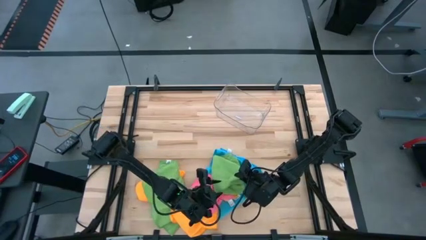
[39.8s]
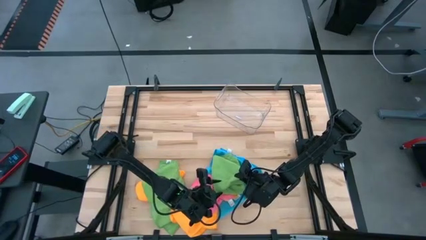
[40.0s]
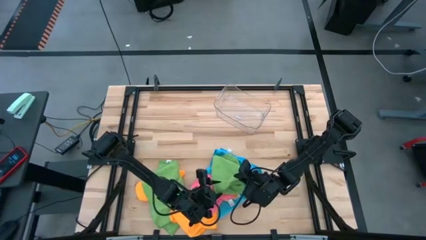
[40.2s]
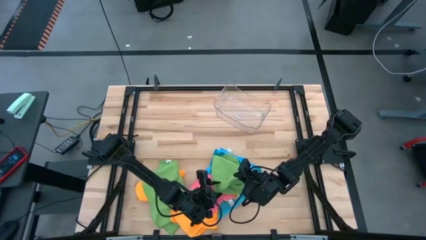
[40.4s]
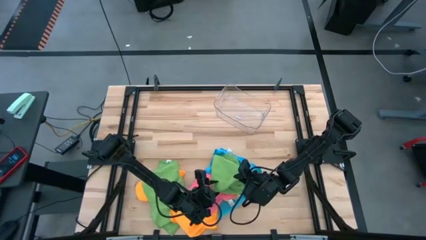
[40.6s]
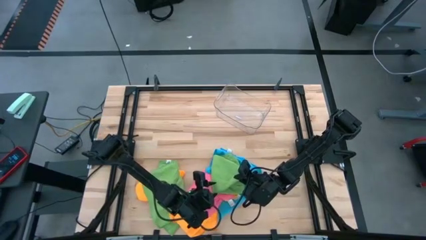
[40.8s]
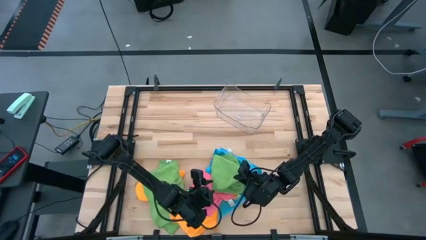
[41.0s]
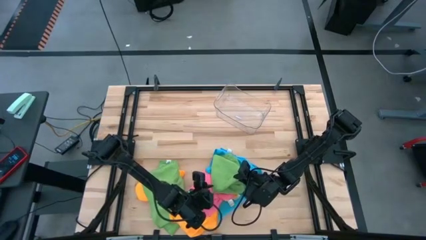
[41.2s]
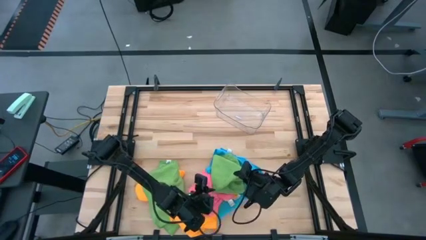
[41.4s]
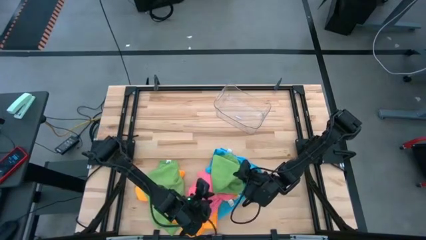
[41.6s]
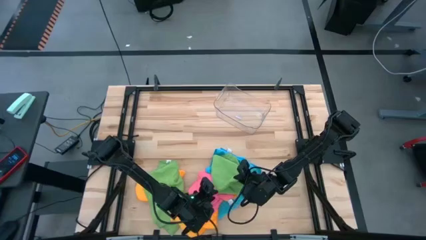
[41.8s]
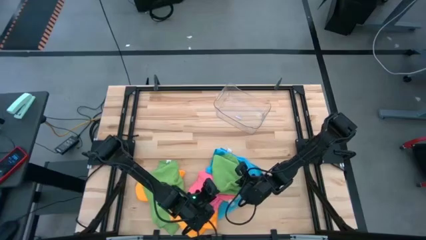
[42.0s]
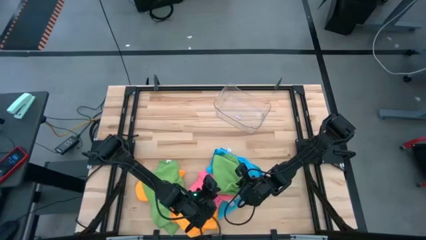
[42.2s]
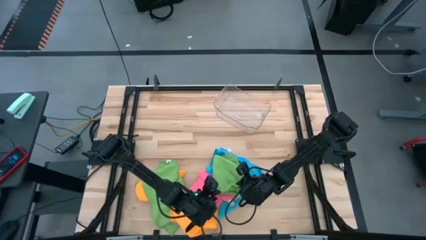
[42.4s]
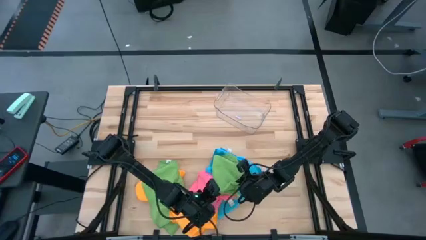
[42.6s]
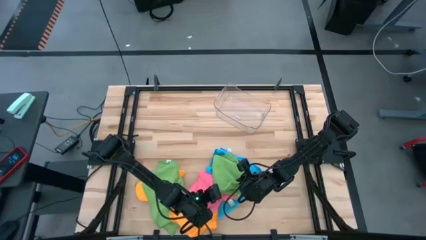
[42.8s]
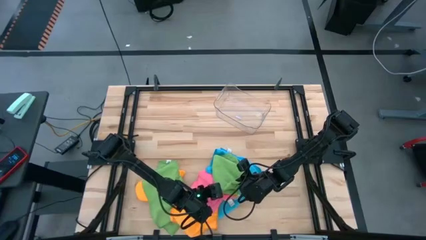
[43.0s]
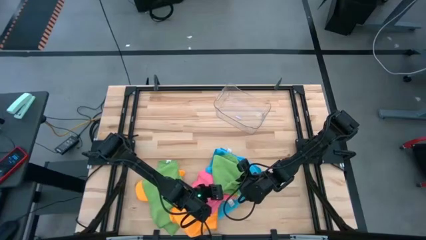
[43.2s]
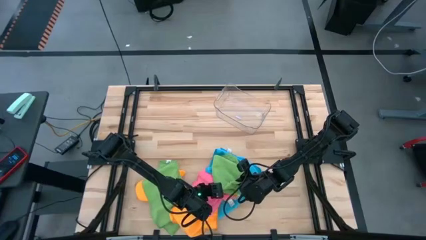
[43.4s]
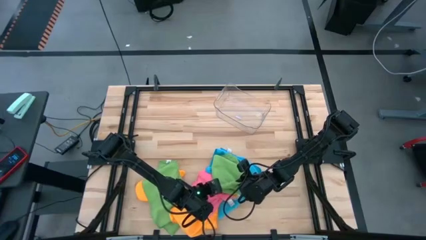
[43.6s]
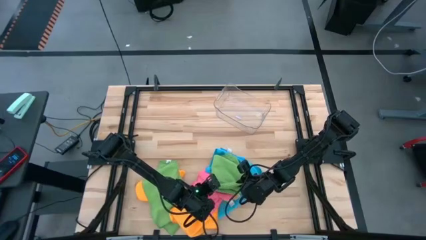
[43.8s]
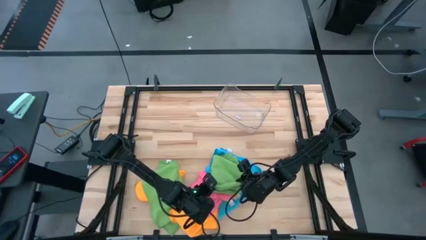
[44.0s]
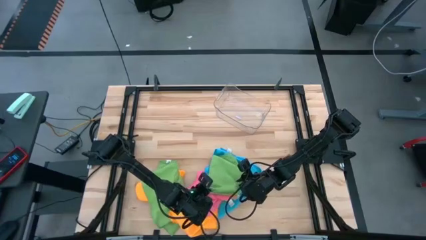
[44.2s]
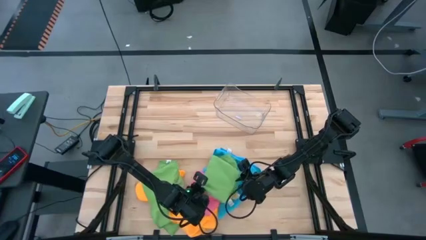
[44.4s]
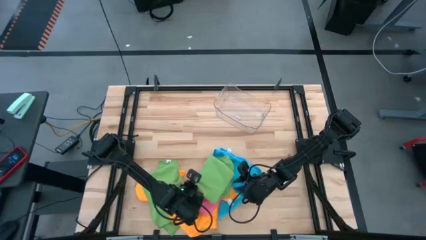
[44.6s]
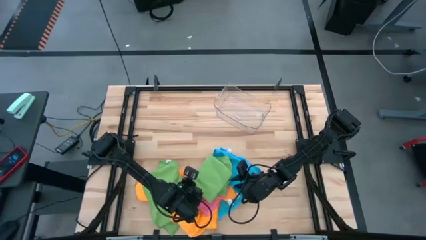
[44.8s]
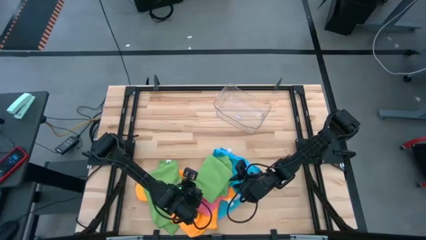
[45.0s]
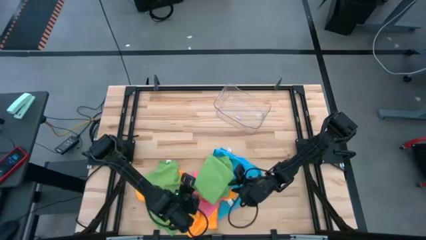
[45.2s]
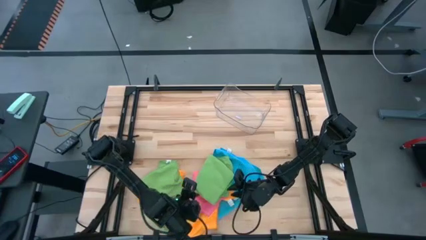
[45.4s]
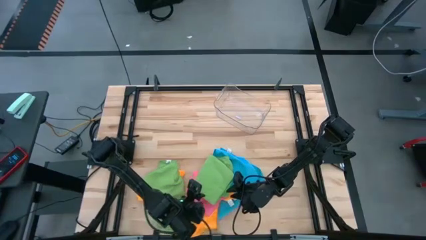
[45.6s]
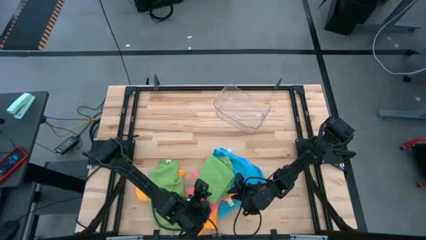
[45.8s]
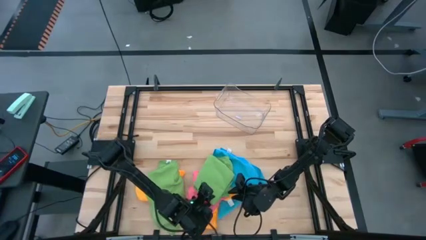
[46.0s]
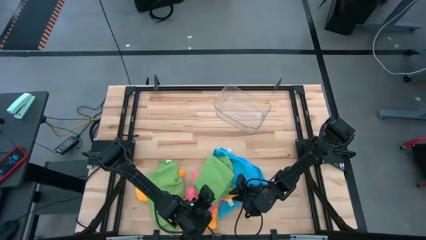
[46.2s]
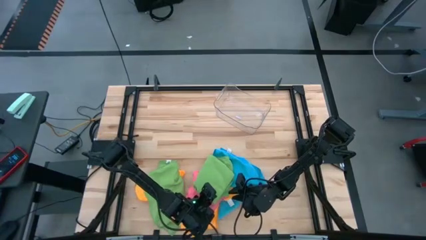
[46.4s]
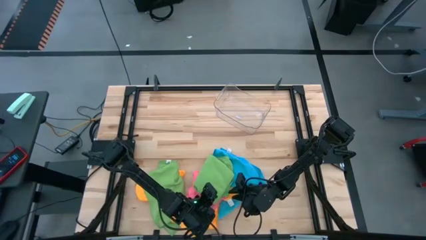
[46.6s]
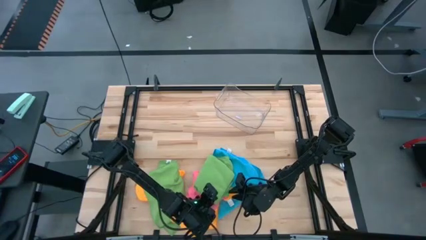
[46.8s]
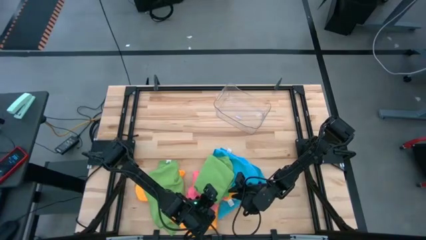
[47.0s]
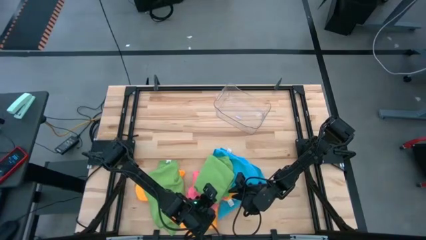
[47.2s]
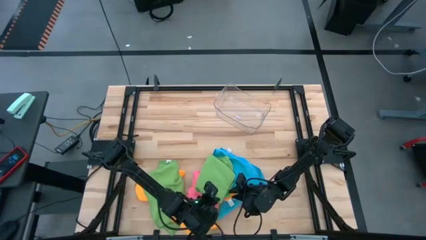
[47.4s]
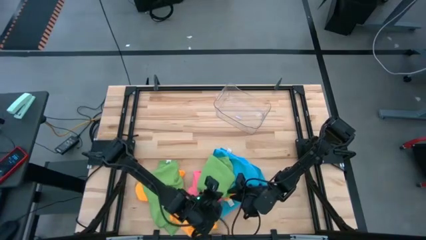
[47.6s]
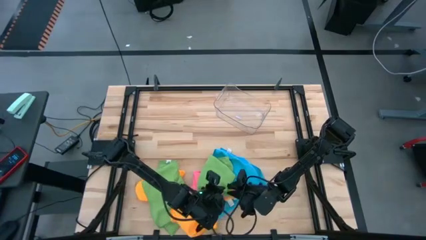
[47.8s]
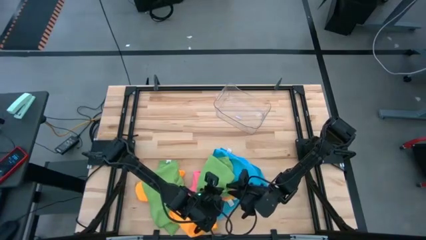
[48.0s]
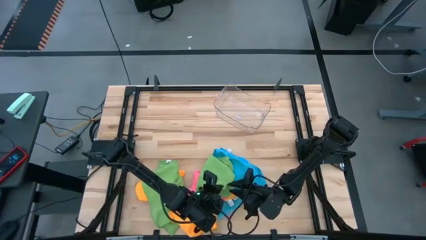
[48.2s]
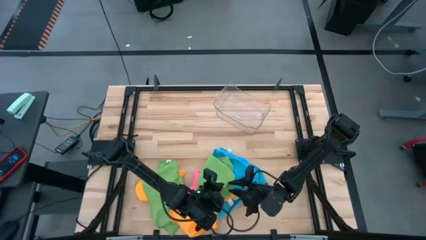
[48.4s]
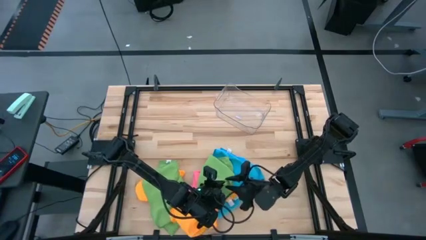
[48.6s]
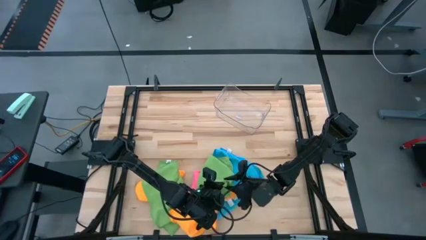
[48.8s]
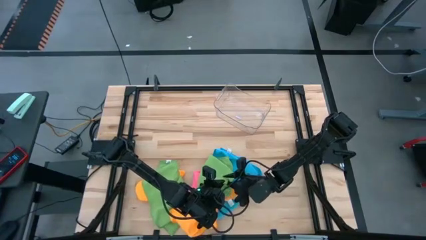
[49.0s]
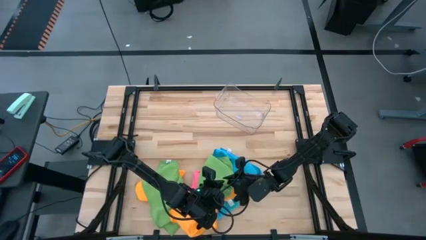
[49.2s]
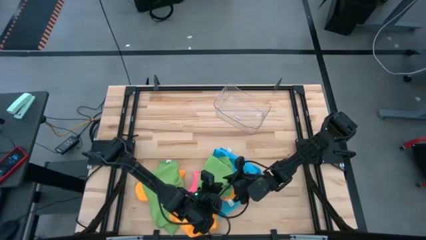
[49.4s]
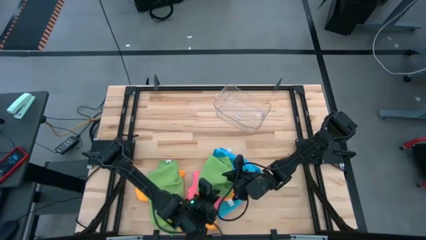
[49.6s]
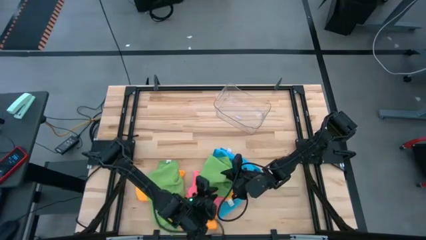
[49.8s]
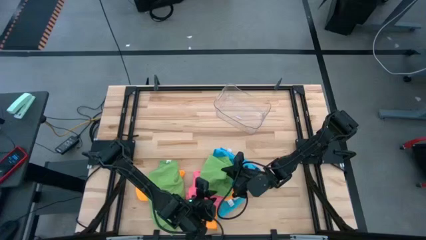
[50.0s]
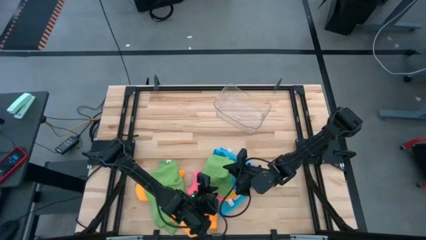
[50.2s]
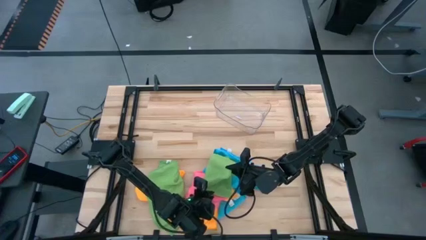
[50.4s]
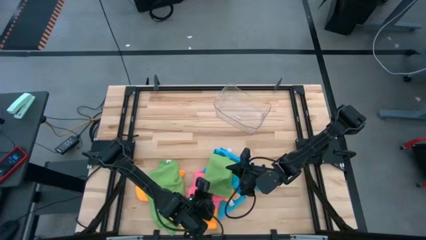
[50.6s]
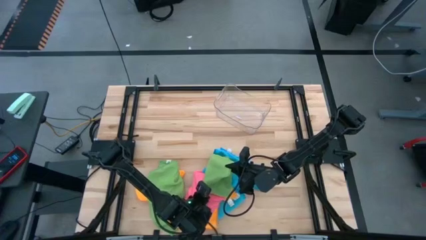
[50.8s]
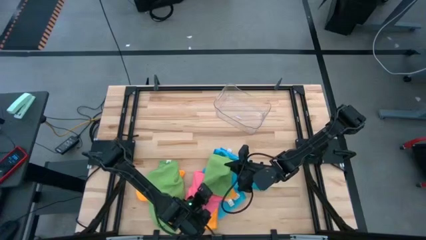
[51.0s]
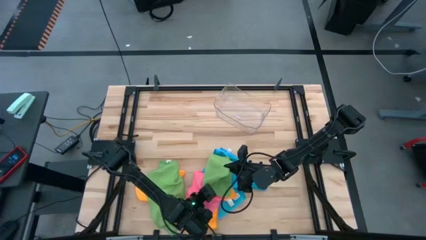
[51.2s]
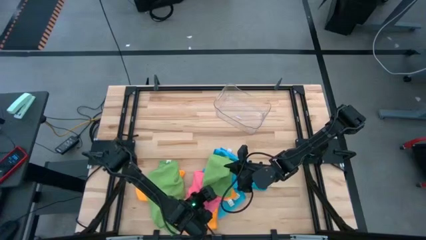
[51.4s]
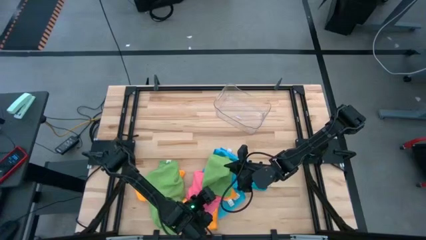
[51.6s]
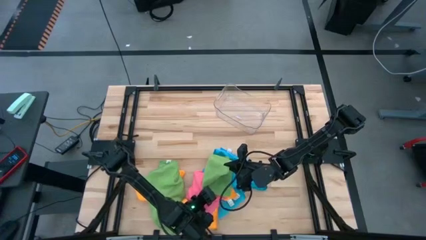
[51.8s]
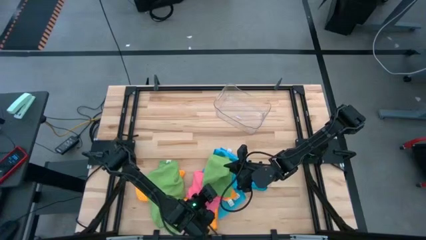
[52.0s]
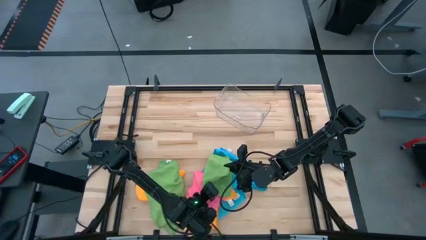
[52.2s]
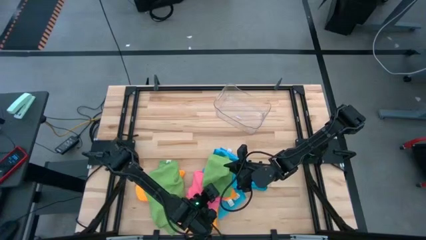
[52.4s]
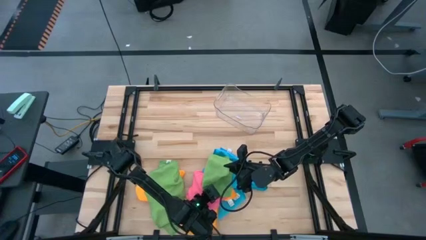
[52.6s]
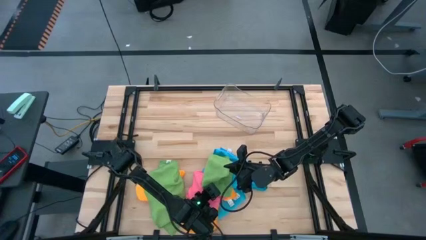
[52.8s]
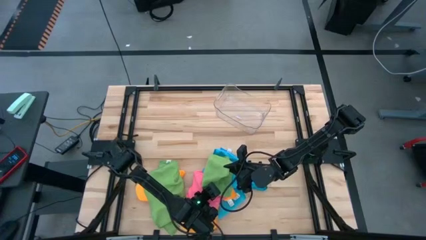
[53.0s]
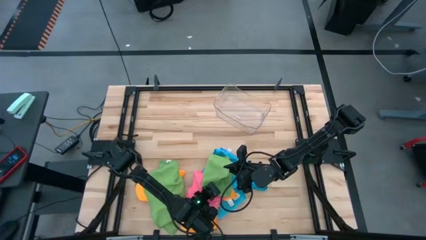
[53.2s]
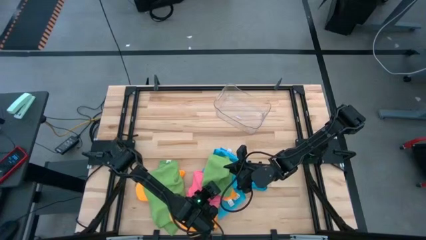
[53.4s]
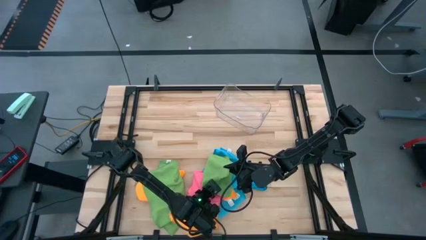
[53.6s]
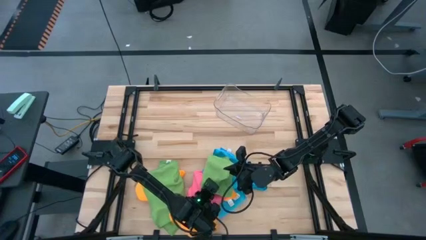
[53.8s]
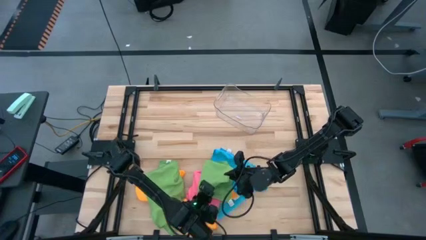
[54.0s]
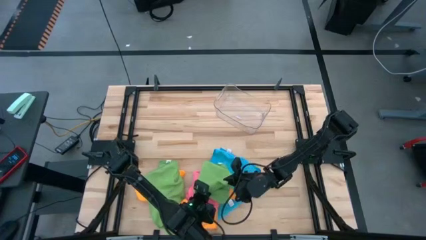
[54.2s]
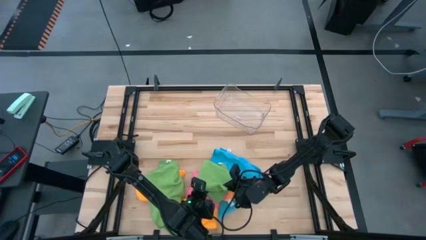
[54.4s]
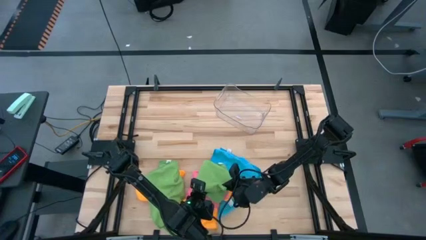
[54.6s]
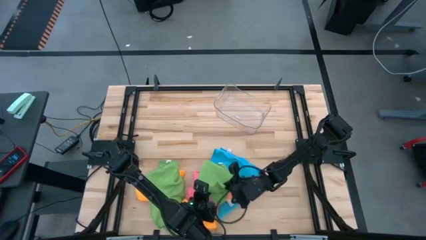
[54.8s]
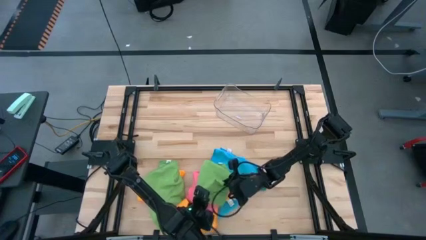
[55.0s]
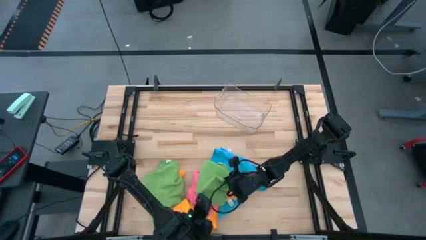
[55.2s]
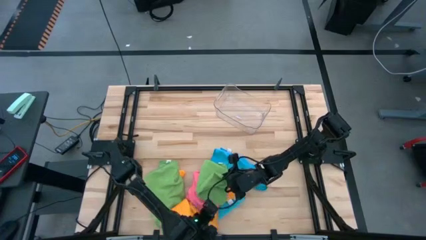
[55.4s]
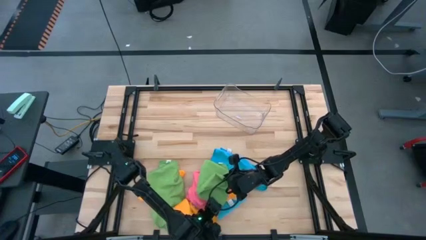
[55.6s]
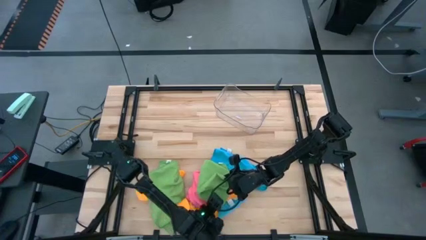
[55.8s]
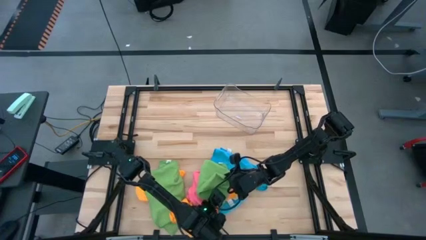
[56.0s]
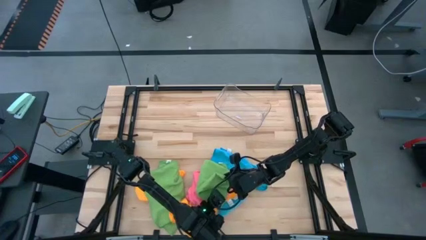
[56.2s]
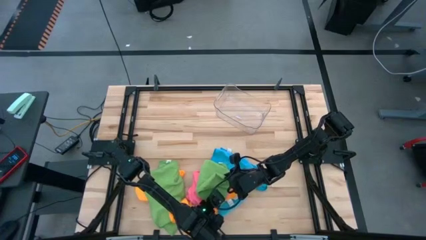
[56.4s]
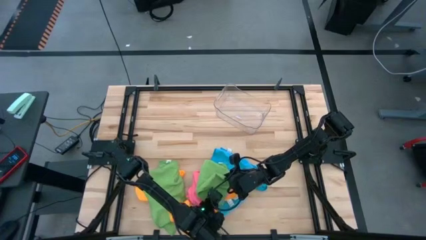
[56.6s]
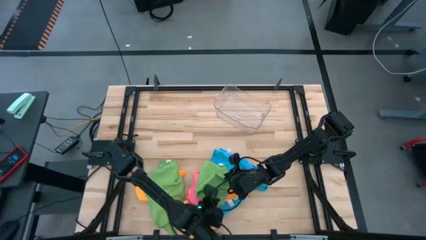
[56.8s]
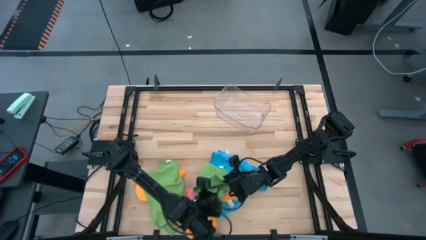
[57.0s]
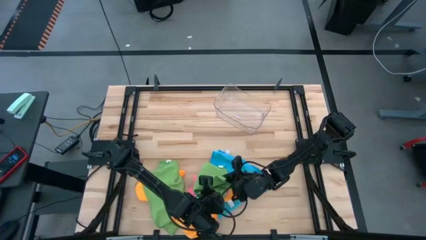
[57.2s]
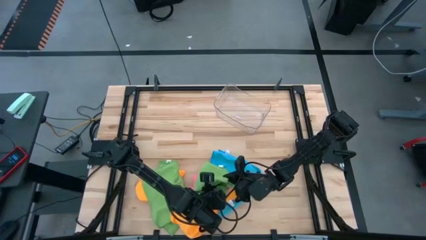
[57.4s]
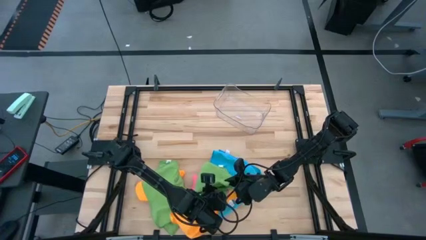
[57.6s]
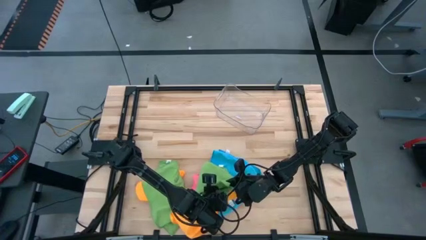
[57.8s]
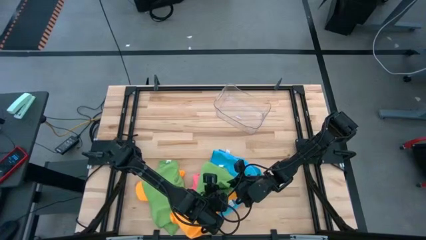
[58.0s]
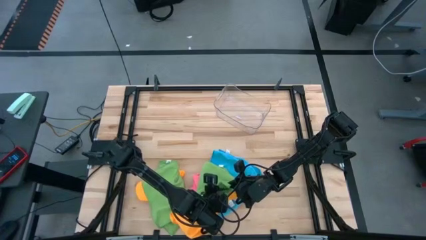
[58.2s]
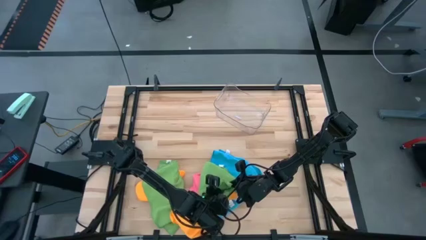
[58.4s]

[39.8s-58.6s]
Task: Fold microfiber towels
Fold the top green towel
